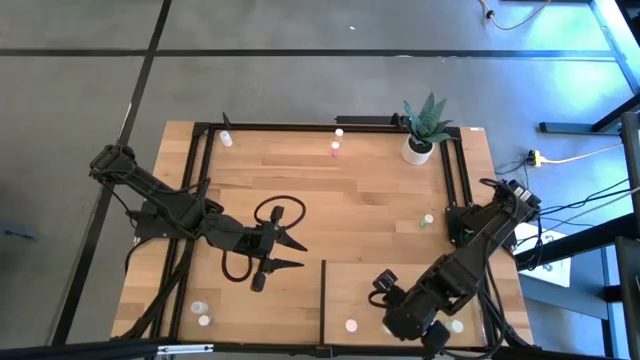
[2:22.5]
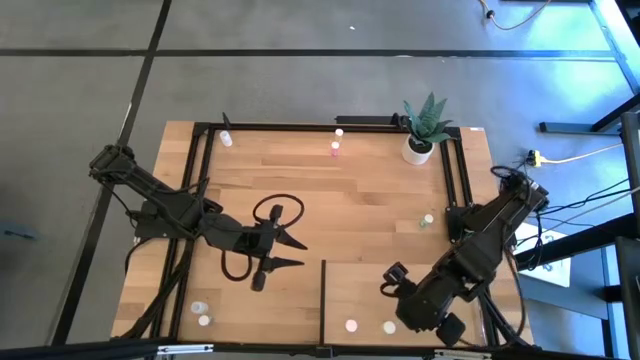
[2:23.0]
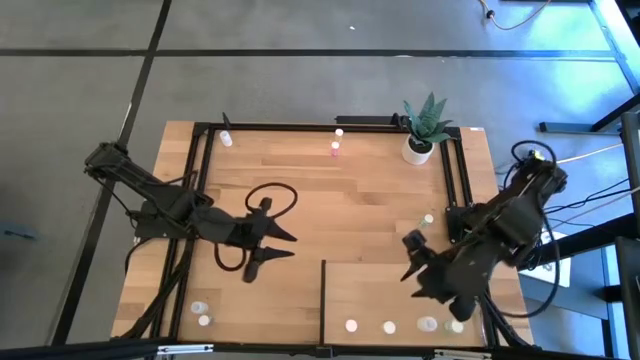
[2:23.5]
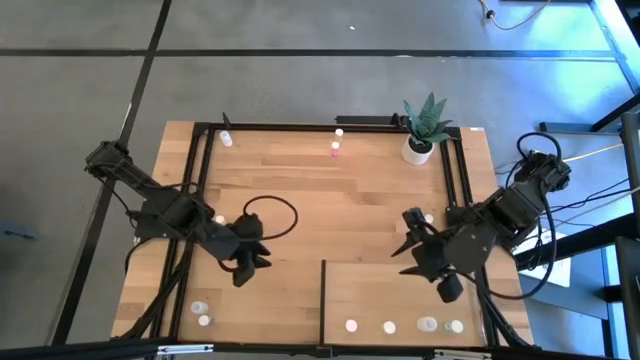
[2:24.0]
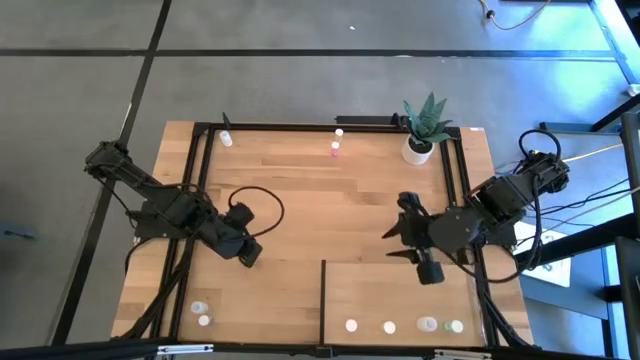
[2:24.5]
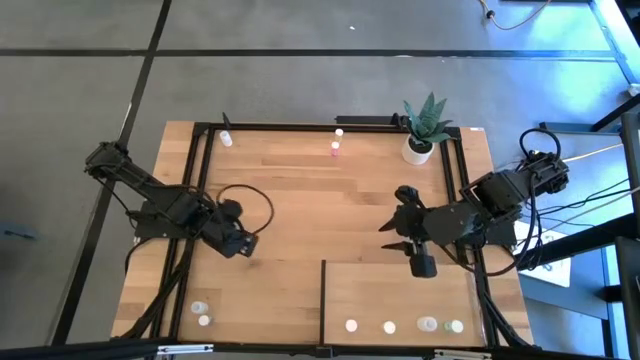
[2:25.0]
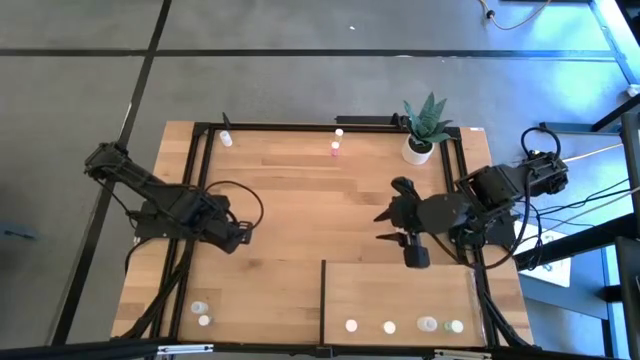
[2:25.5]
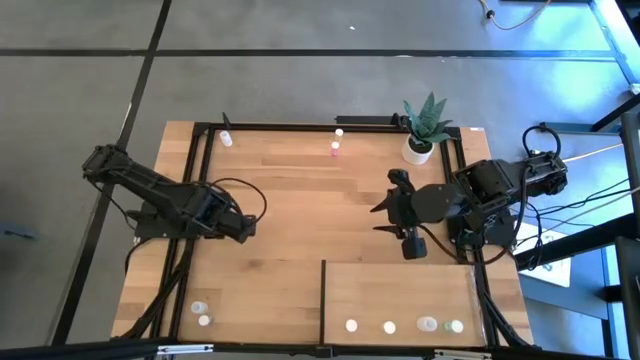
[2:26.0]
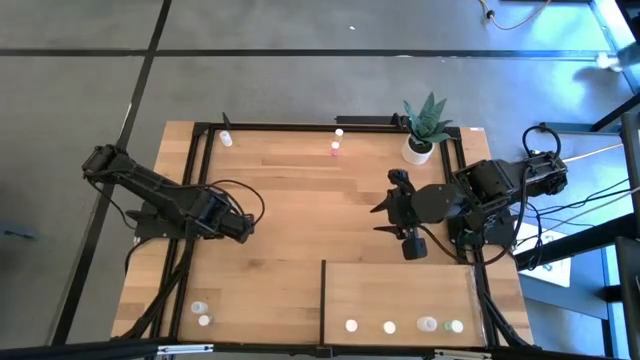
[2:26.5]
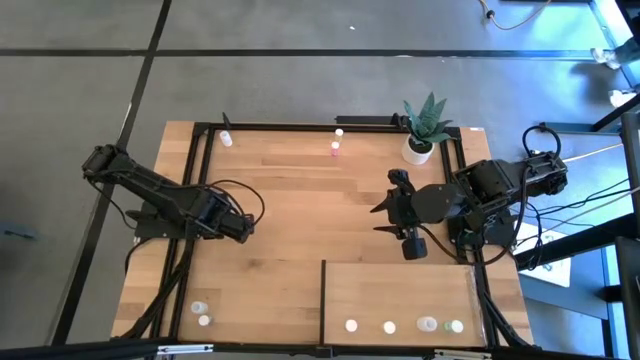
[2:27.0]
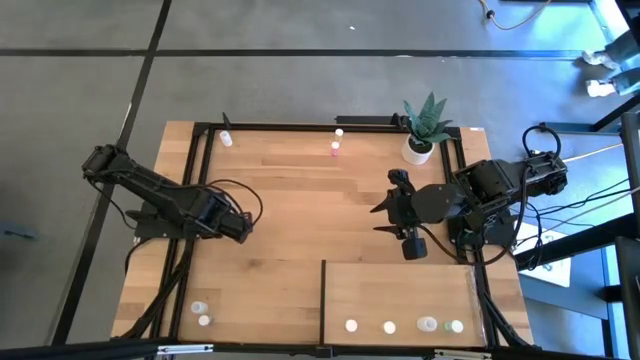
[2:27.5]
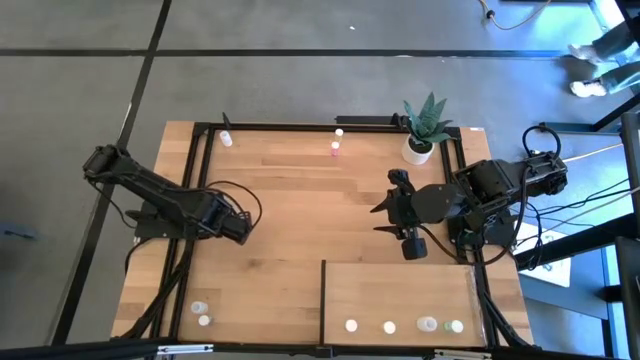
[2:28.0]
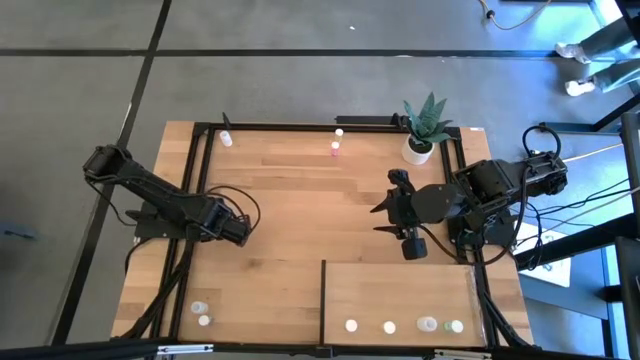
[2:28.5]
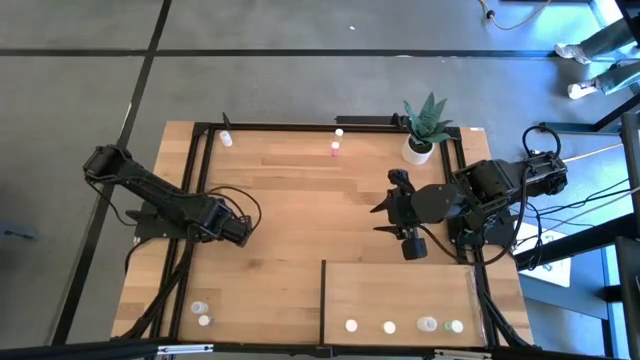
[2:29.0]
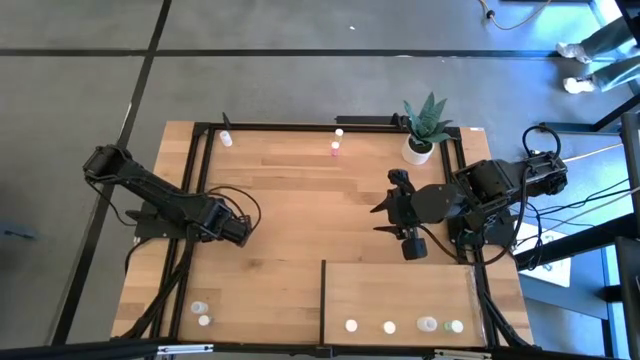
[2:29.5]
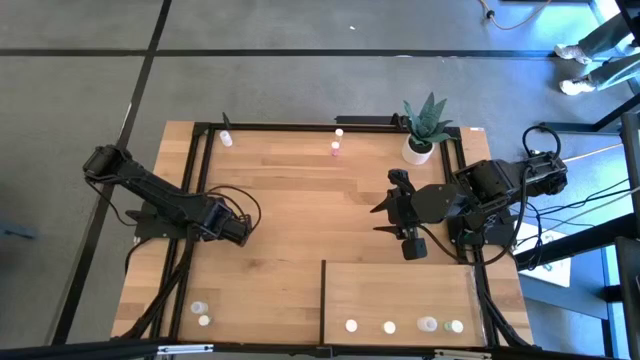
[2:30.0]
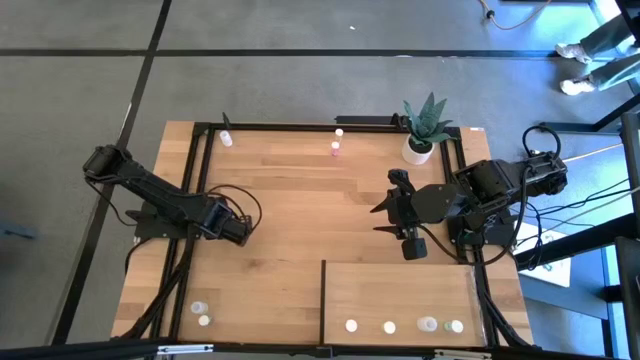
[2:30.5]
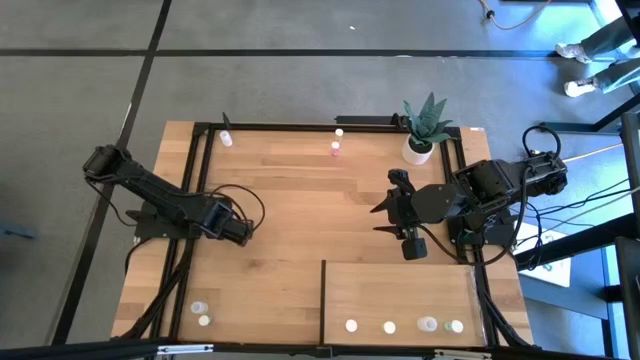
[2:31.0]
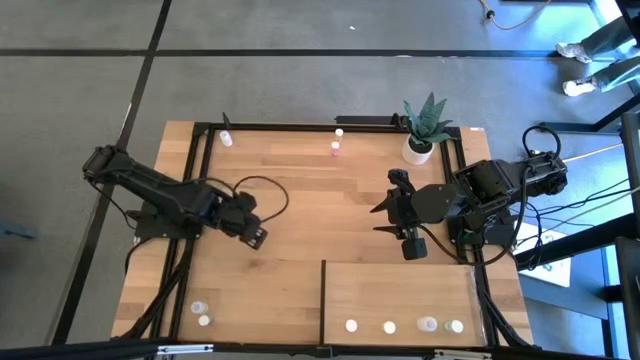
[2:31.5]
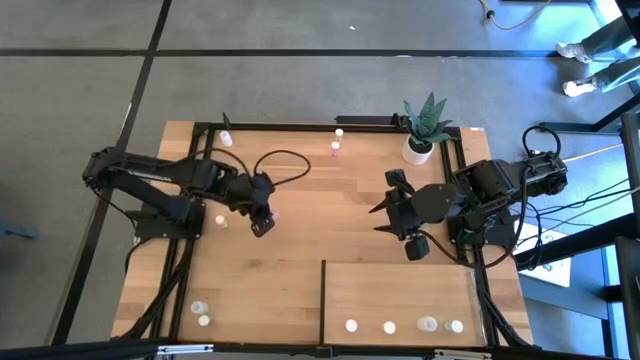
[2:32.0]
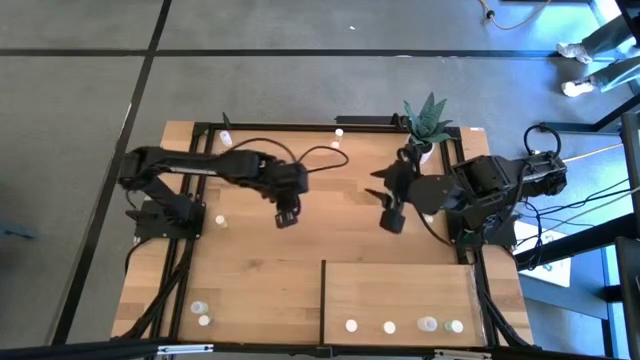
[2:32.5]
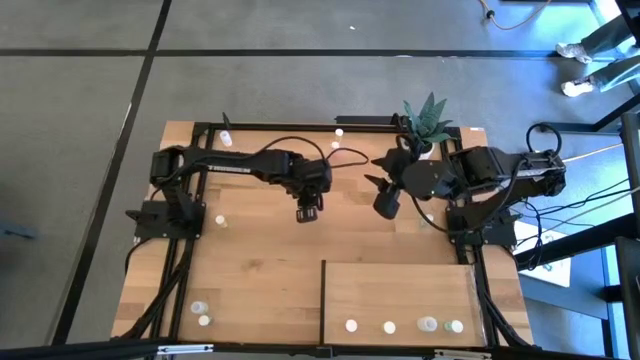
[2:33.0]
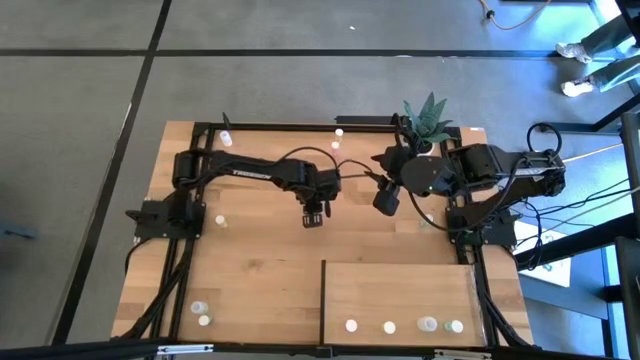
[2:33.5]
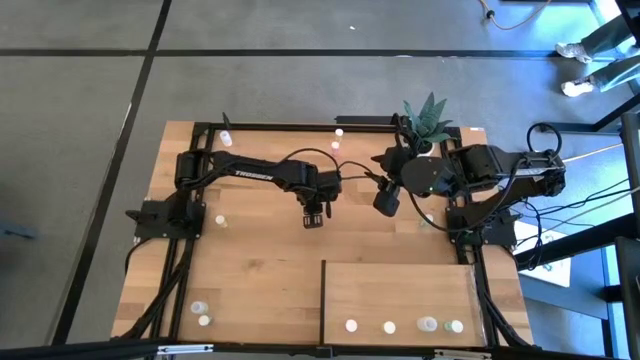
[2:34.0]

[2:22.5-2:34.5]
Task: Pick and place medicine bottles onto shelf by color
Put the bottom pink pill bottle on the shelf aligned with the other pink pill bottle

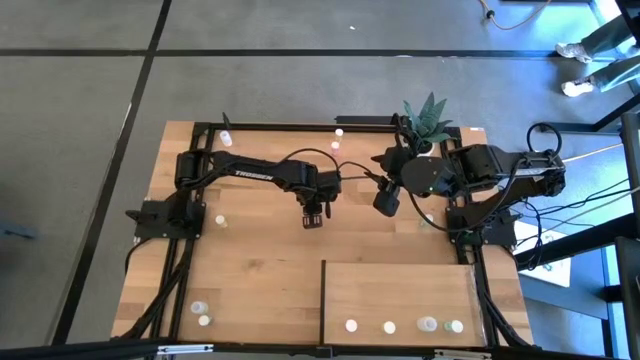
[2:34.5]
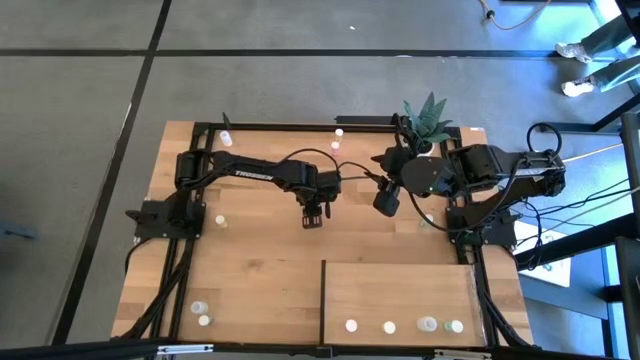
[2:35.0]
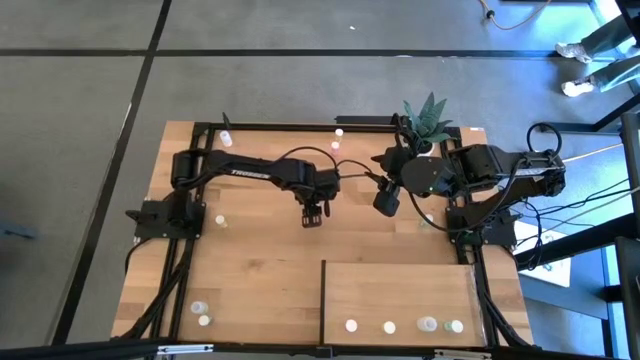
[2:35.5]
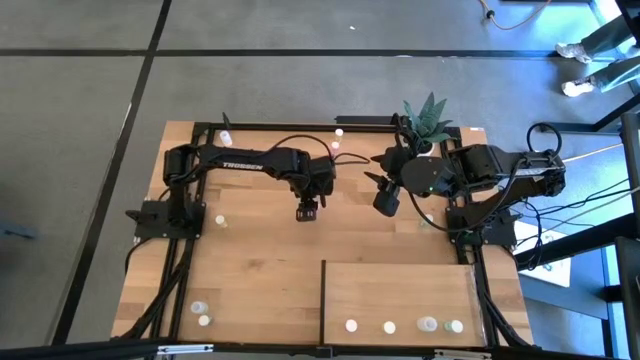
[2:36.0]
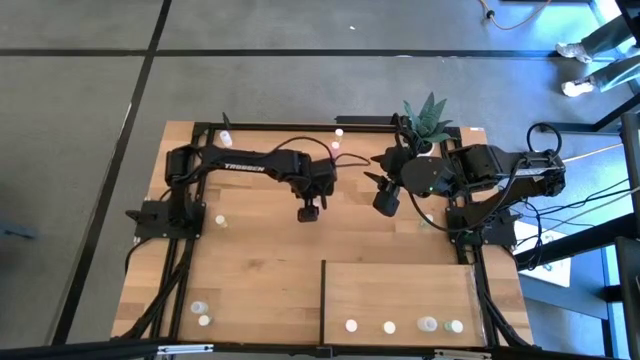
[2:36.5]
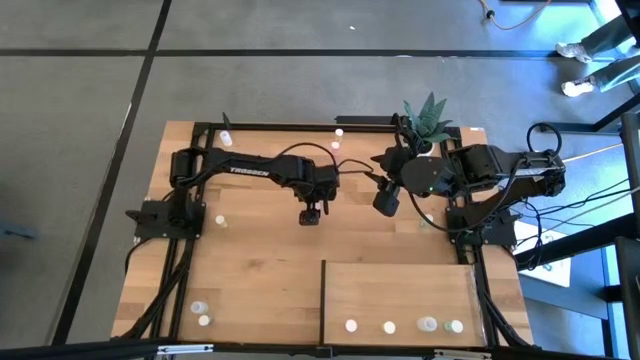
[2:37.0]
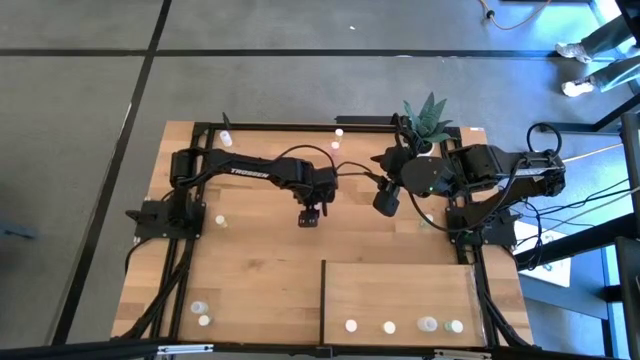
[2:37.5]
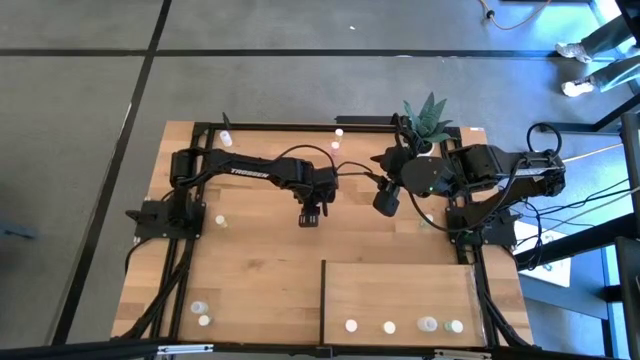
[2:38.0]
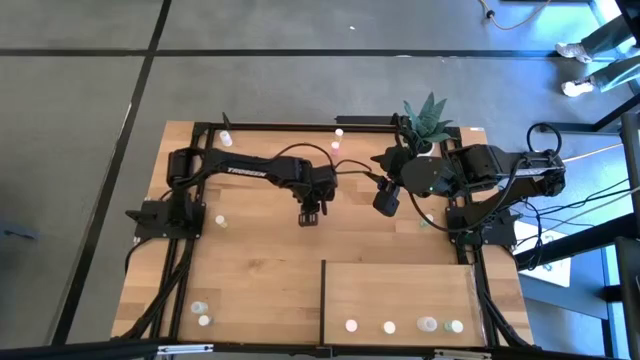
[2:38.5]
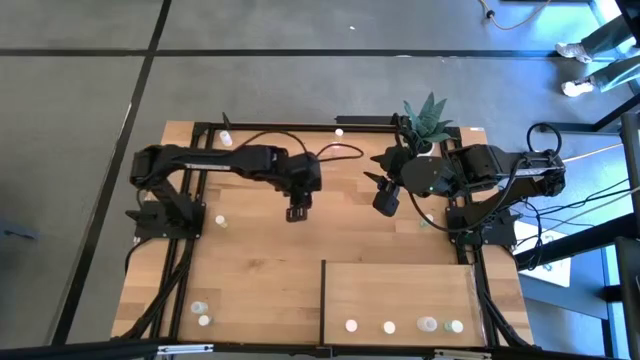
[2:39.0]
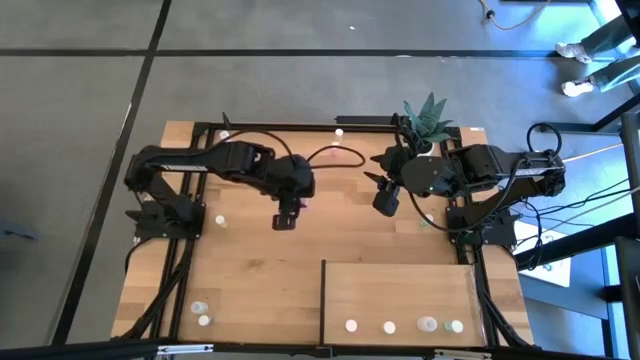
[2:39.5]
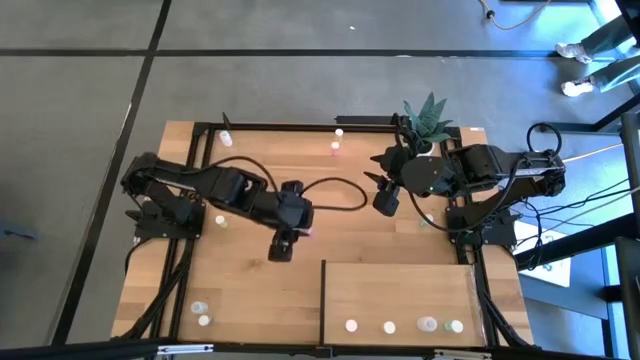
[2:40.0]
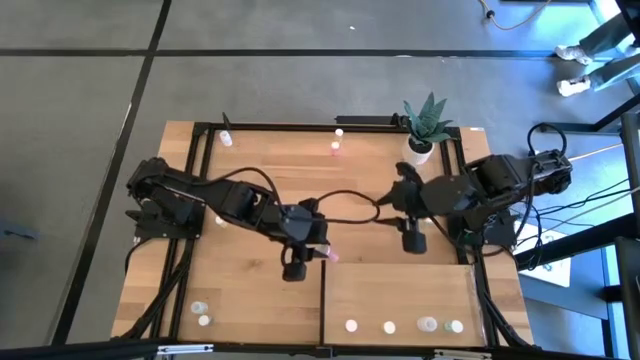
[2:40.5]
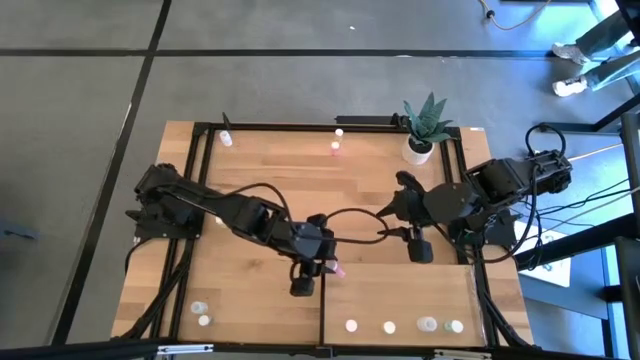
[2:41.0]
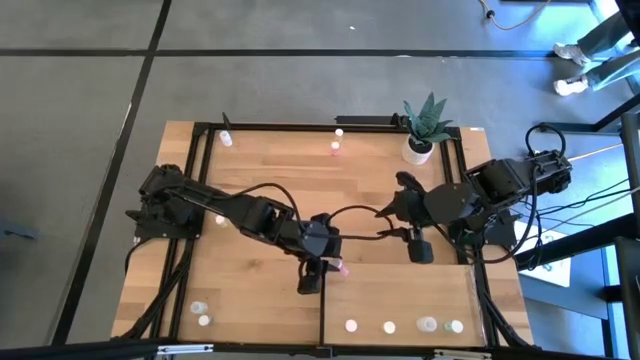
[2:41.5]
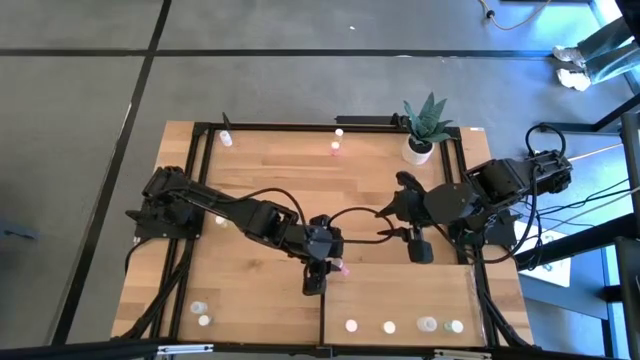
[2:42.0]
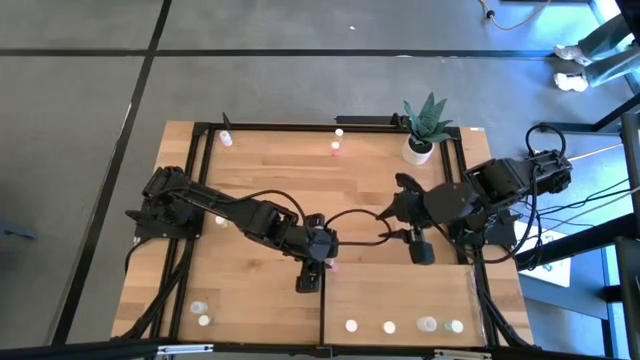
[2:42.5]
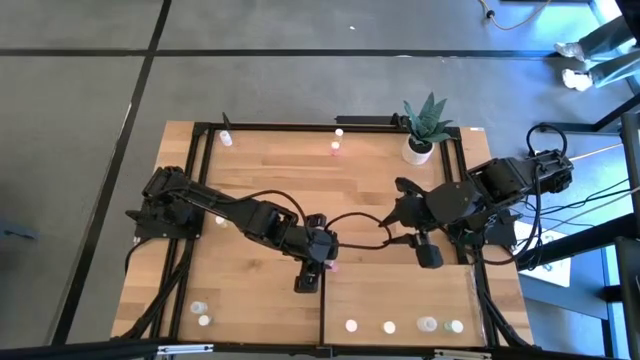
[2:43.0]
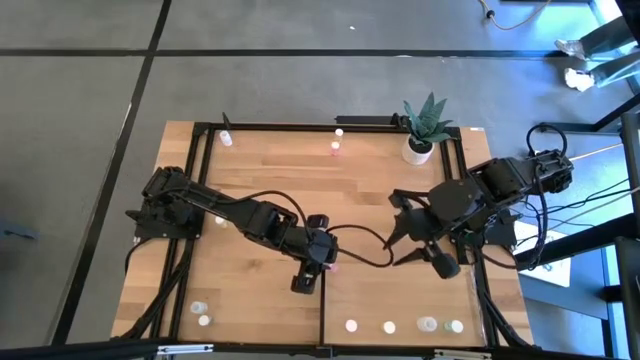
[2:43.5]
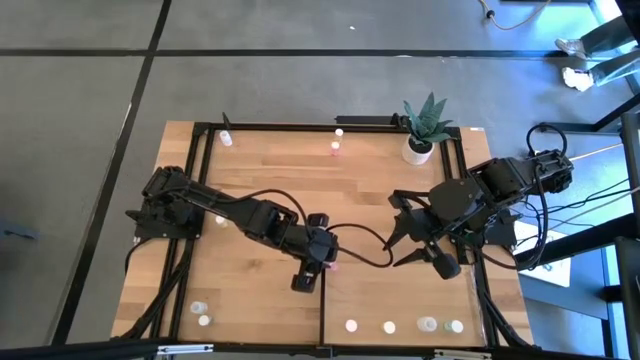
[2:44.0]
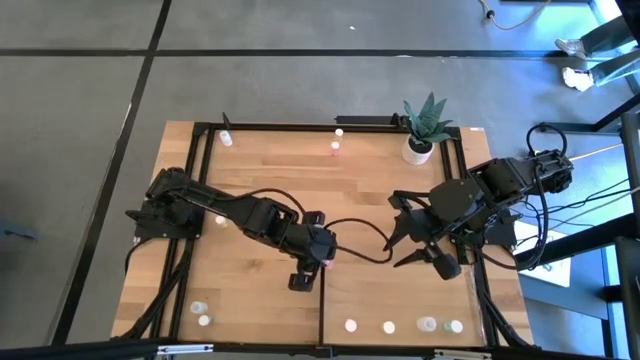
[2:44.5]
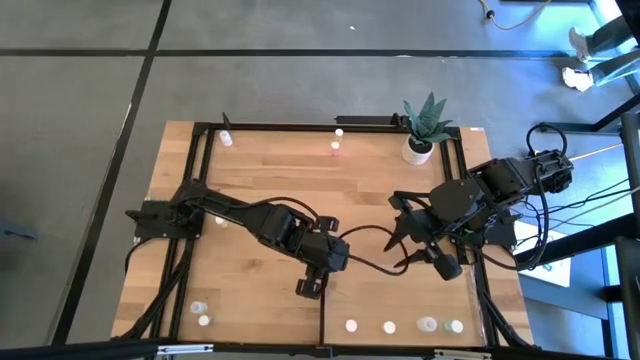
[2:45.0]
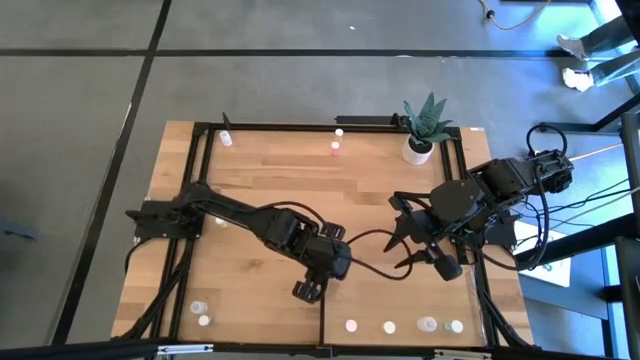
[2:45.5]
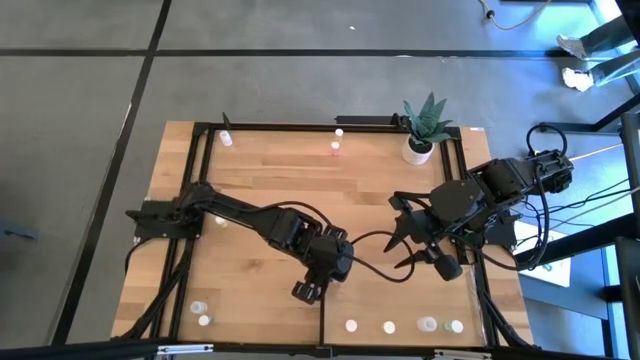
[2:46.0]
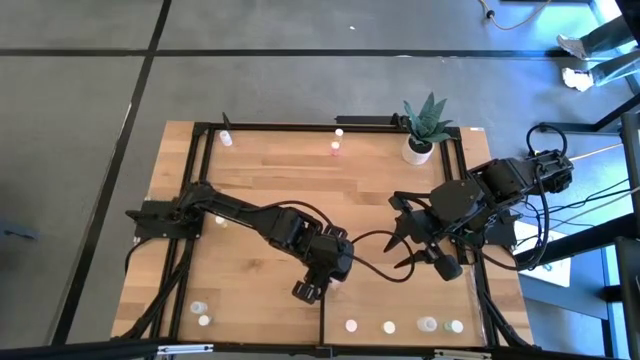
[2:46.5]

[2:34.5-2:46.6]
Put the bottom pink pill bottle on the shelf aligned with the other pink pill bottle
